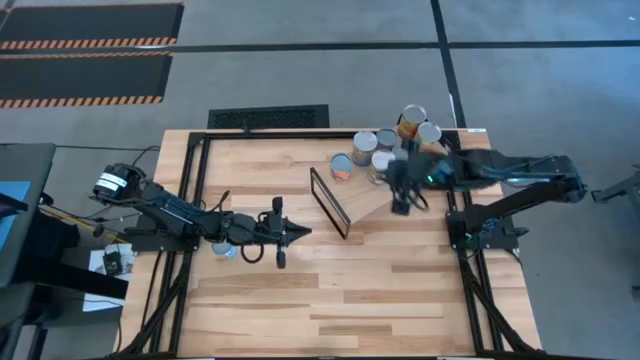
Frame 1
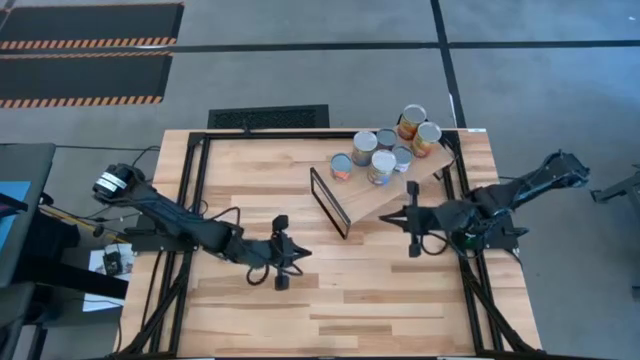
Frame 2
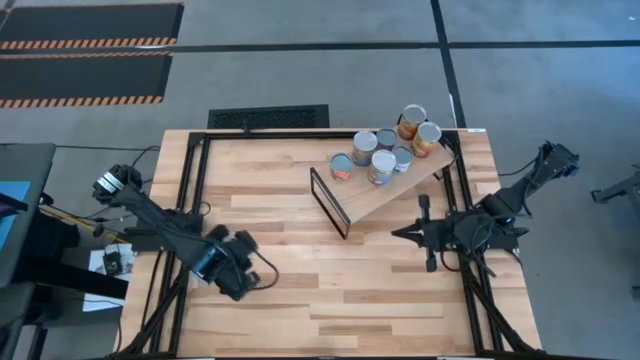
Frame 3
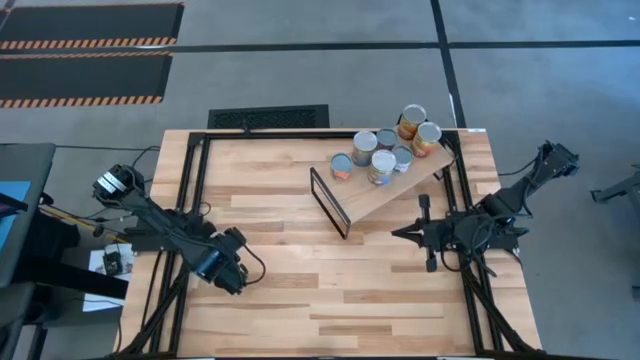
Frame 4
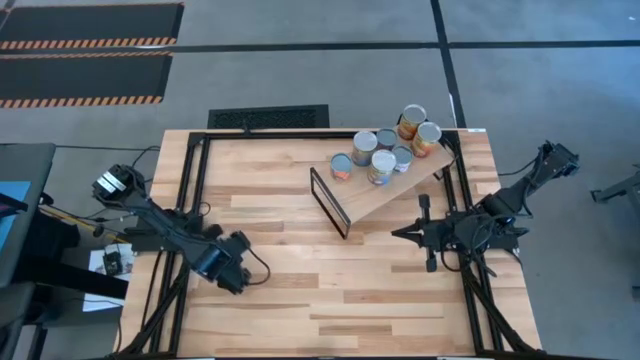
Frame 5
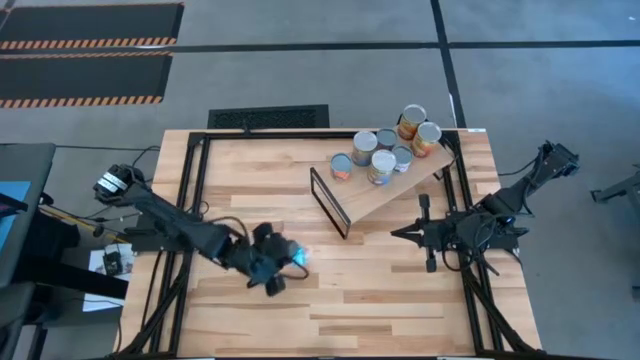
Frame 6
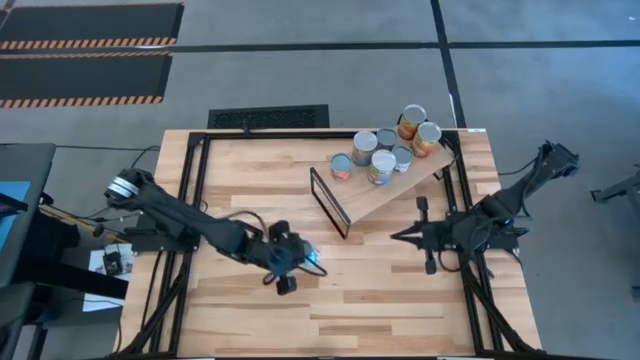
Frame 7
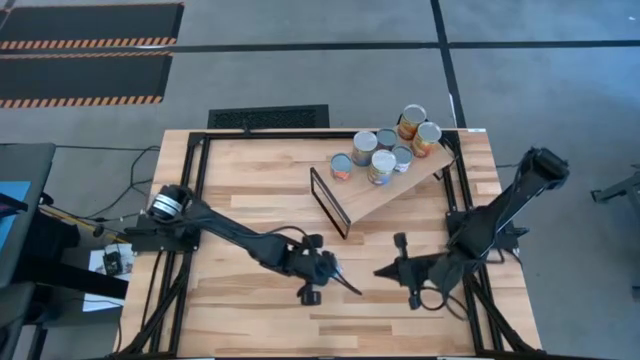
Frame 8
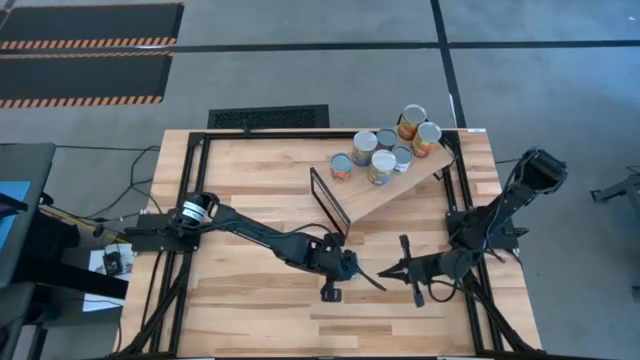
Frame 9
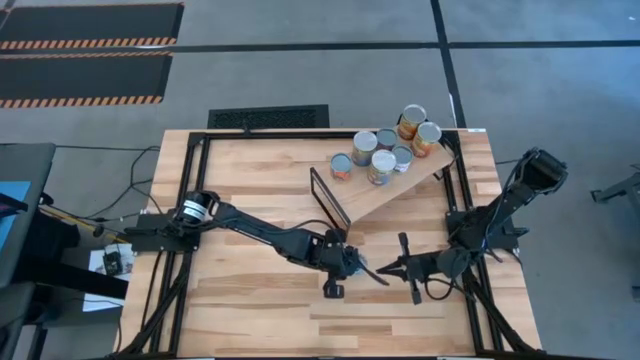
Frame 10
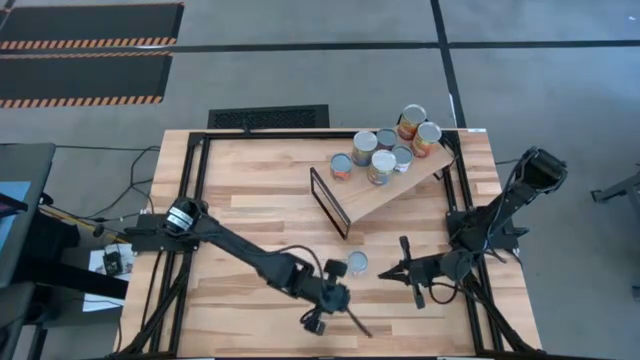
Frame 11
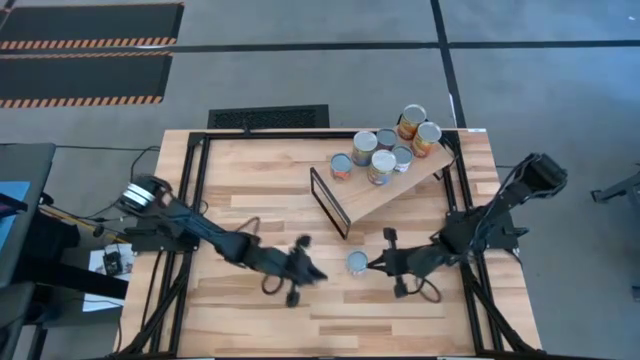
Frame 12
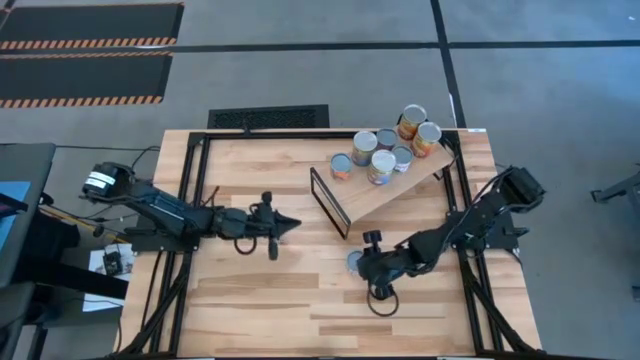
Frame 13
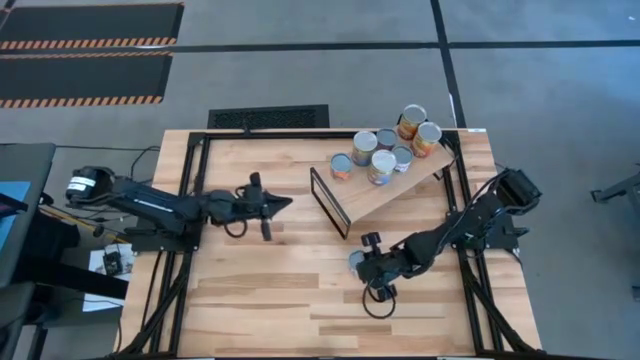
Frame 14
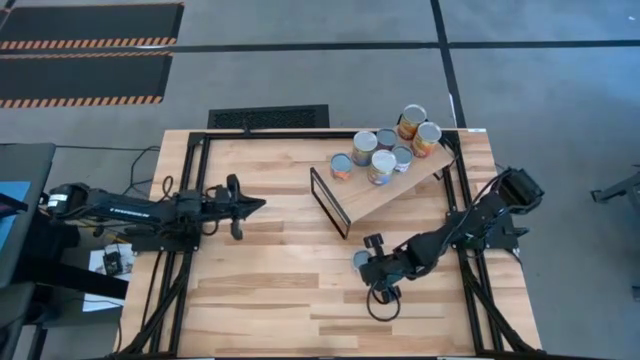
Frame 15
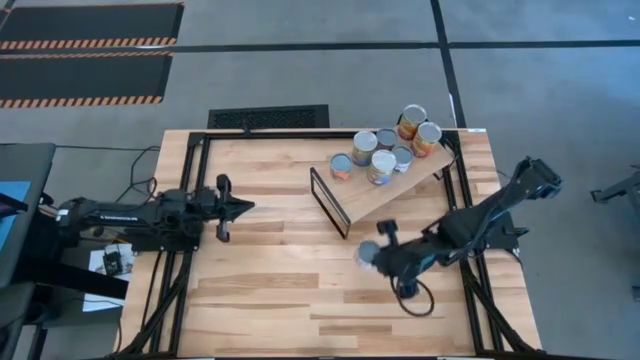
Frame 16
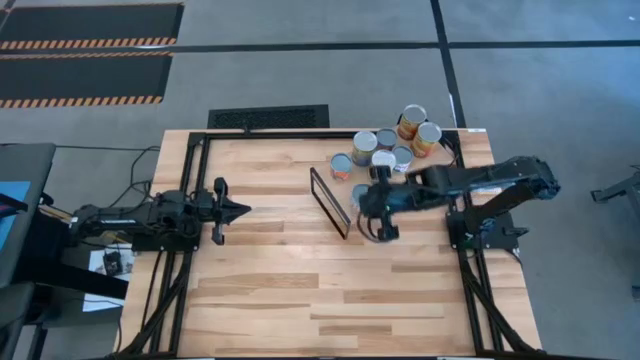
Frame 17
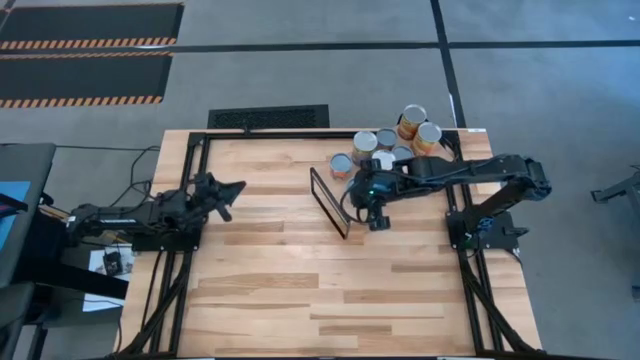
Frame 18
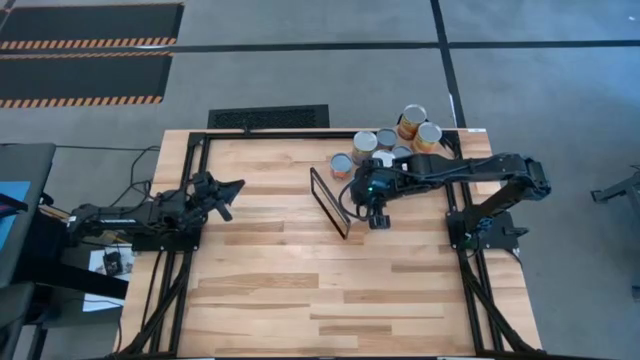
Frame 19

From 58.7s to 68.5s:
Task: Pick and place cans onto a shelf
Put the canned carrots on the shelf

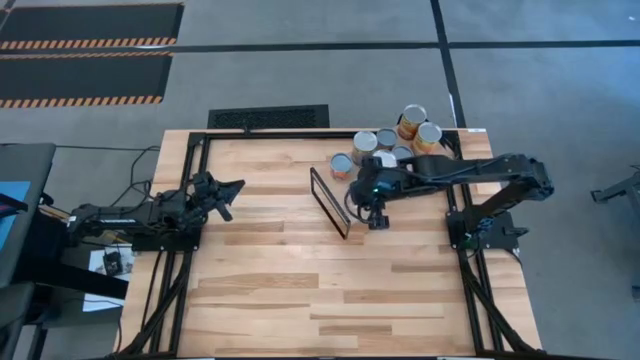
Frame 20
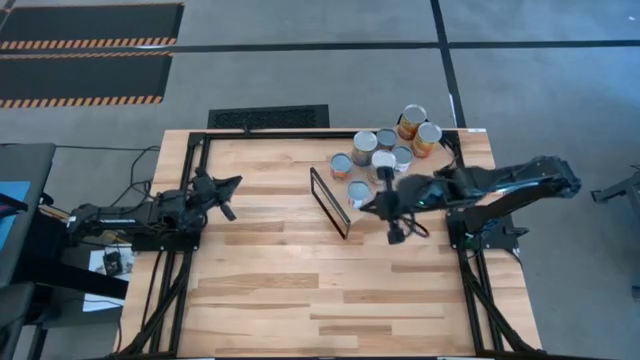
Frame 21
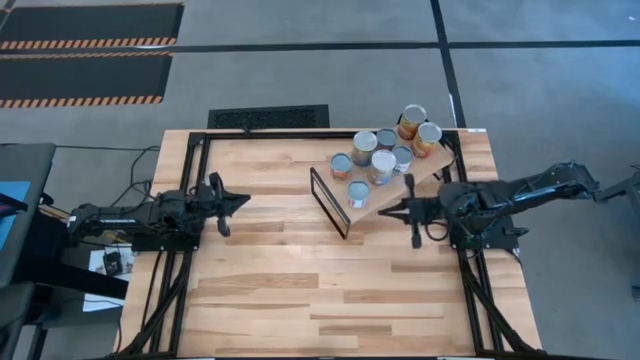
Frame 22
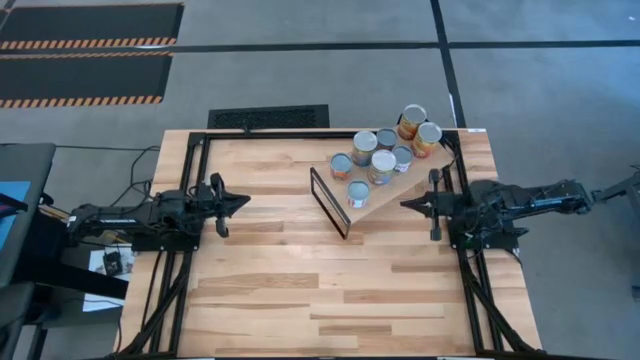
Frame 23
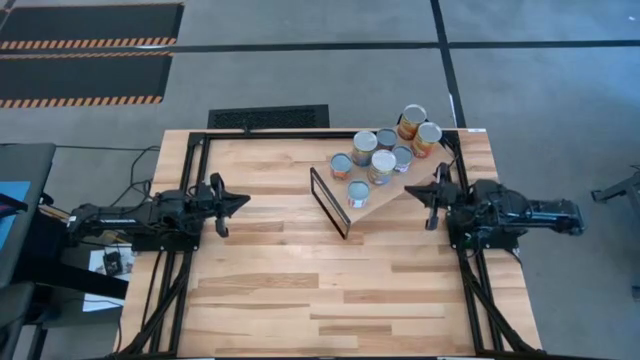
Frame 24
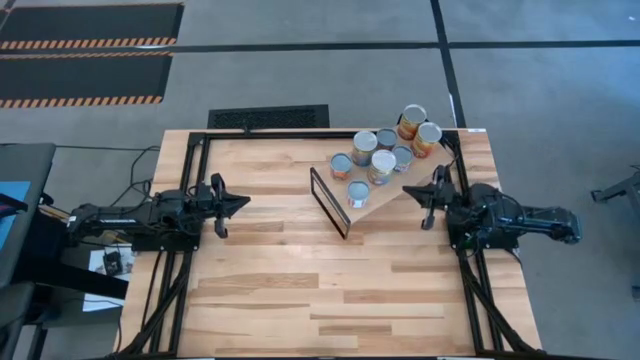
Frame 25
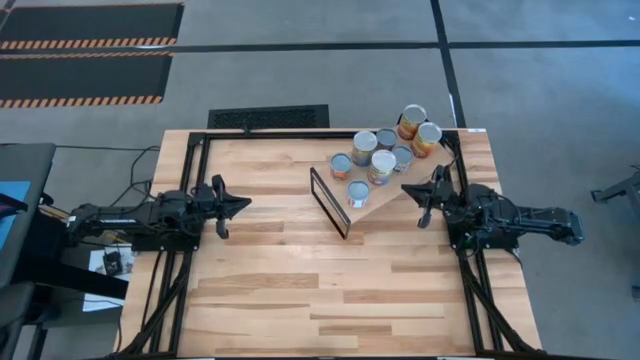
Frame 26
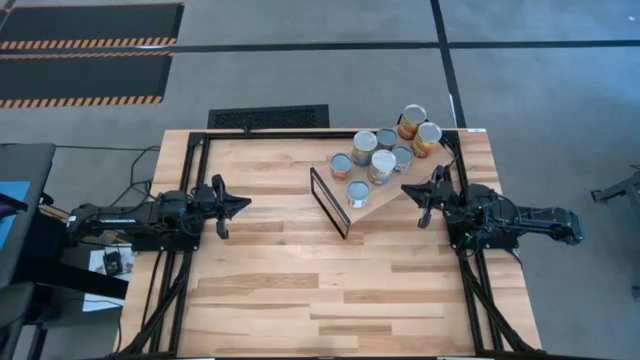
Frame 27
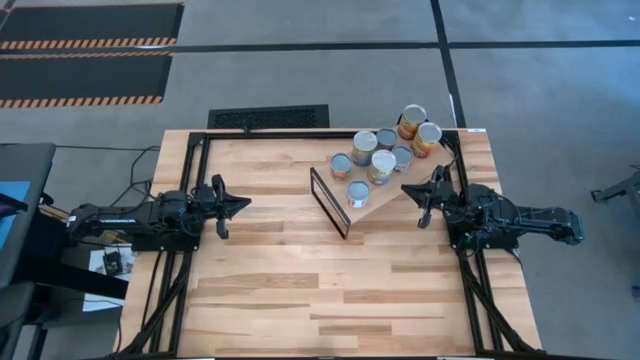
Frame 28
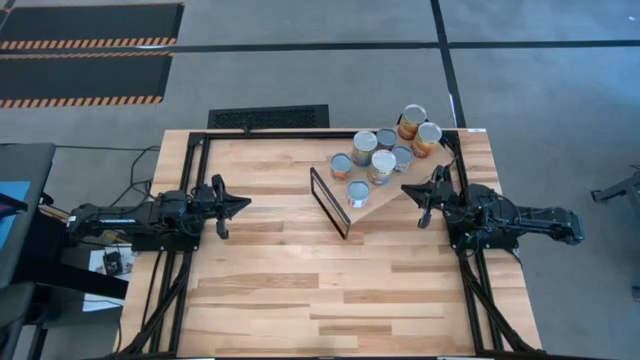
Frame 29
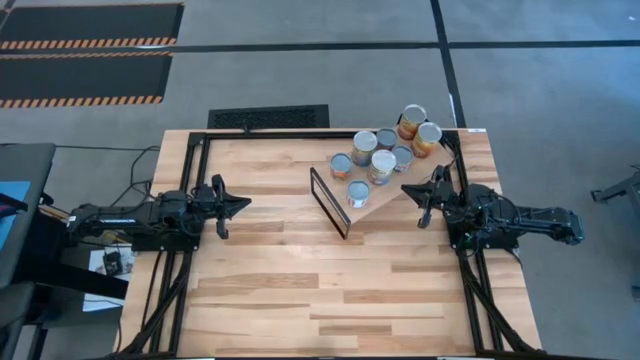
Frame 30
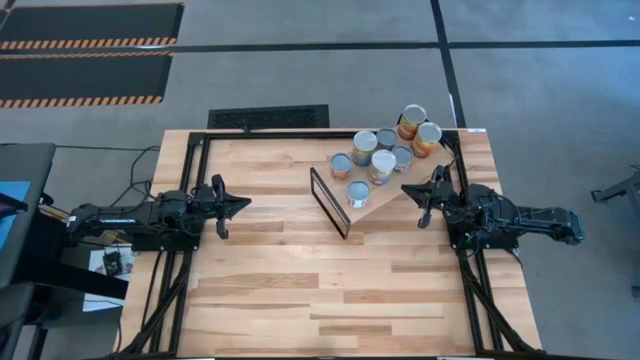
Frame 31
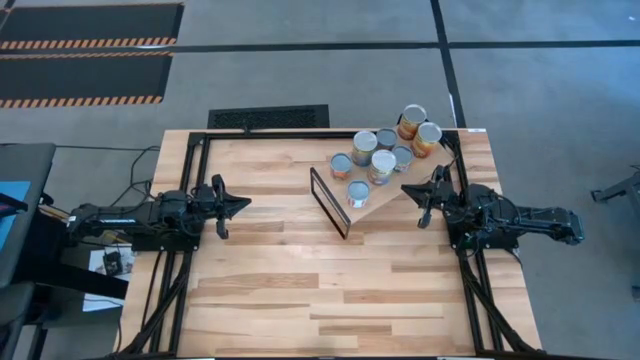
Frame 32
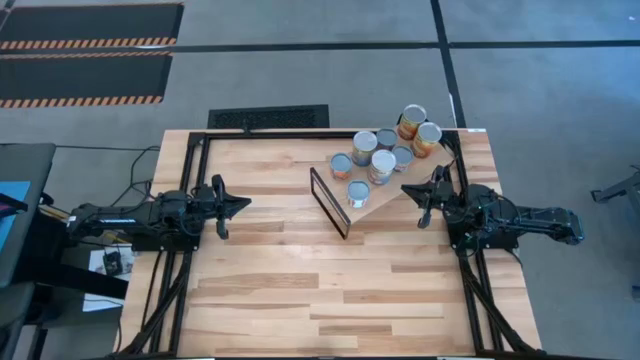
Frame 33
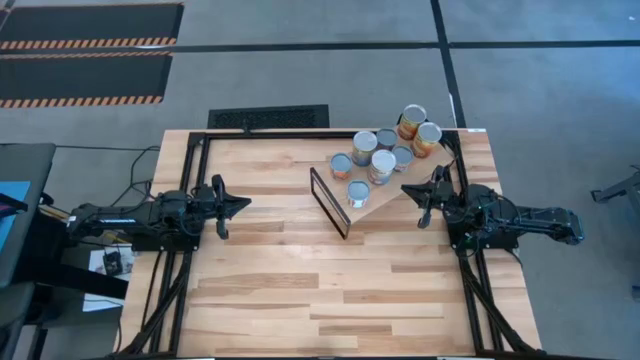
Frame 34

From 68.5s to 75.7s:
Return to Home Position

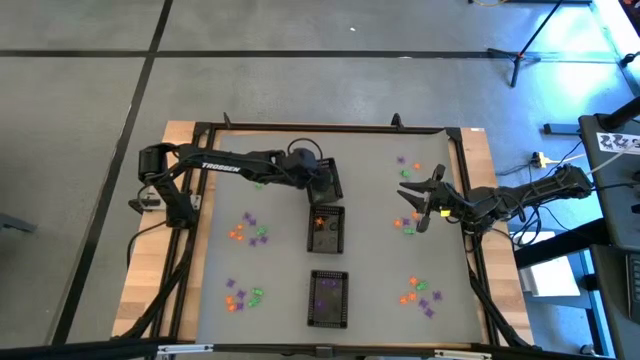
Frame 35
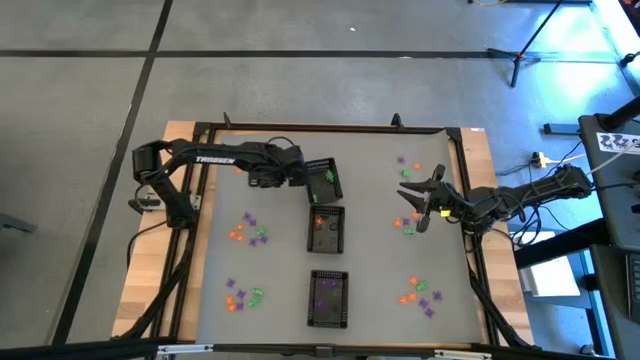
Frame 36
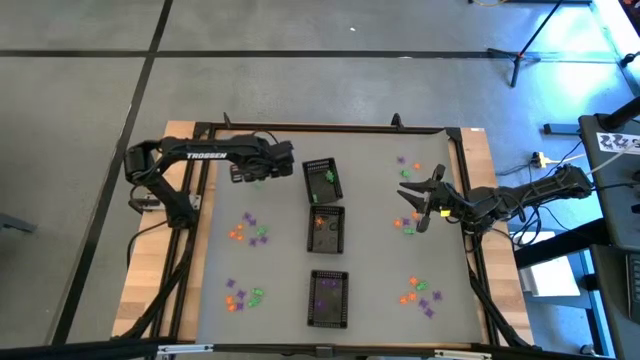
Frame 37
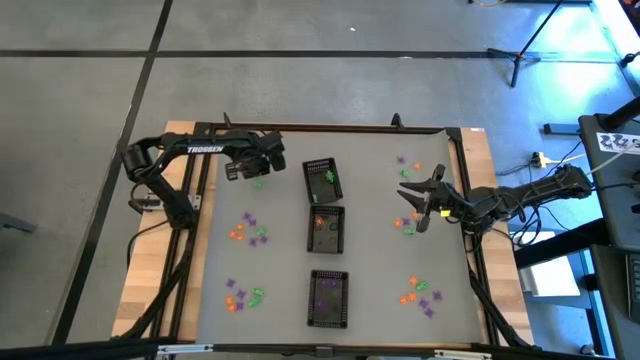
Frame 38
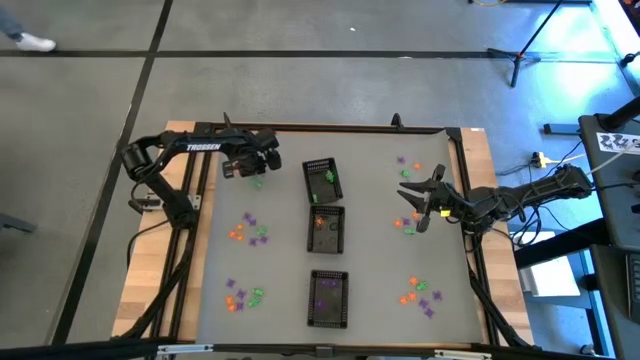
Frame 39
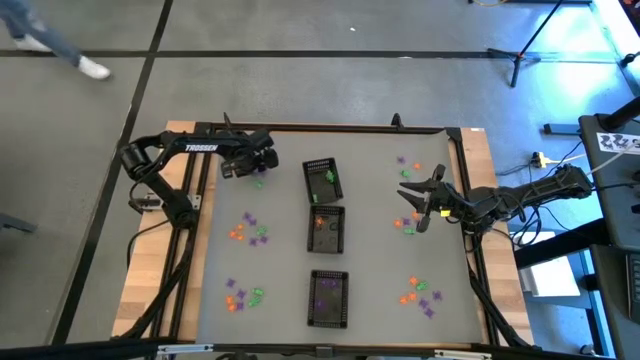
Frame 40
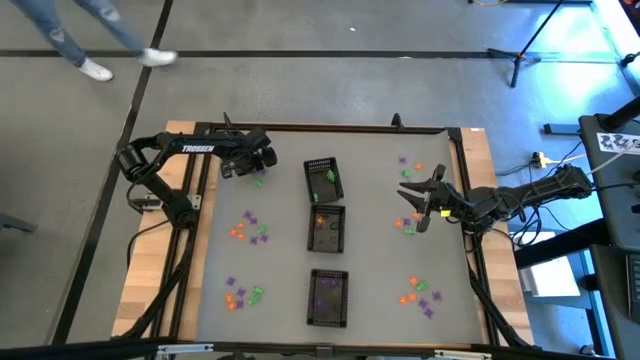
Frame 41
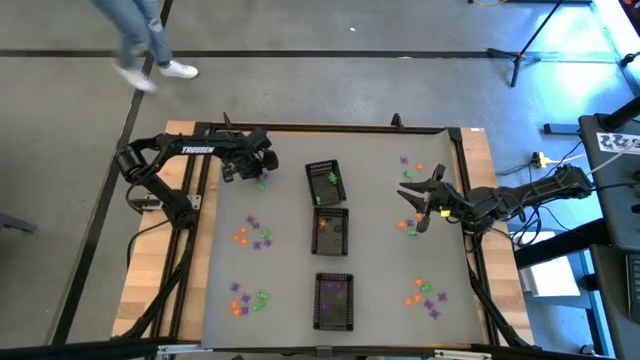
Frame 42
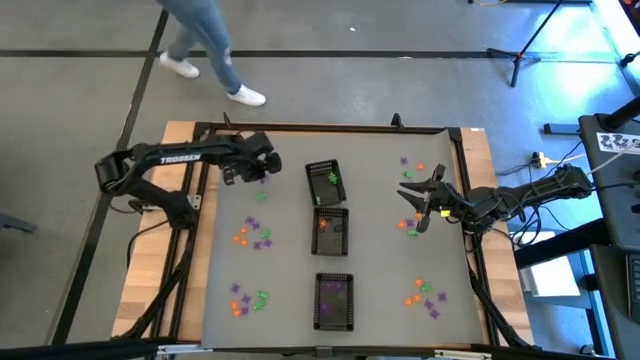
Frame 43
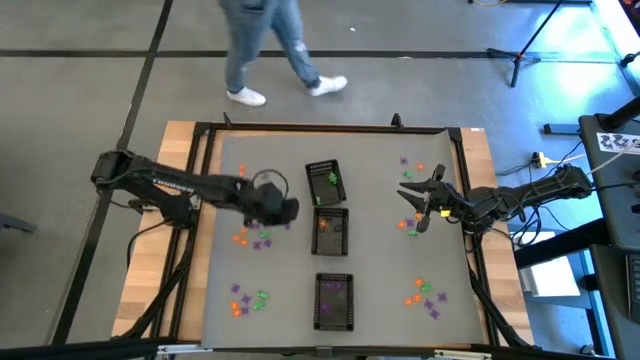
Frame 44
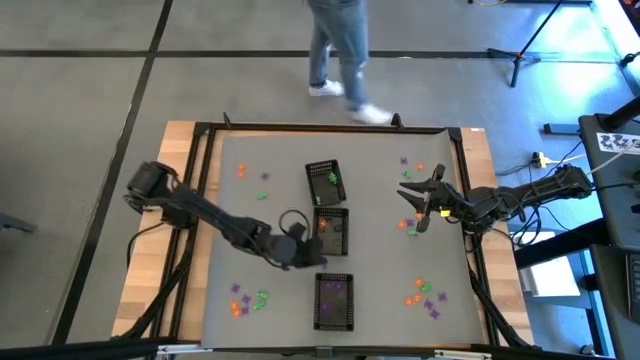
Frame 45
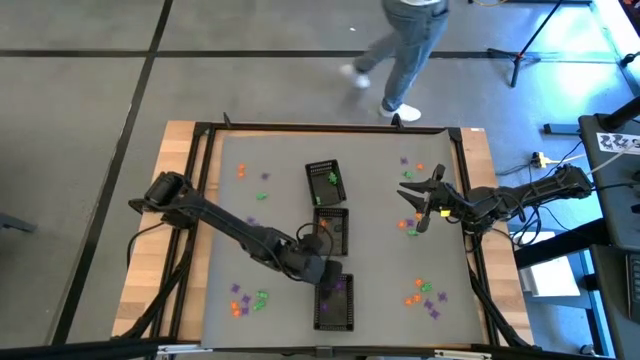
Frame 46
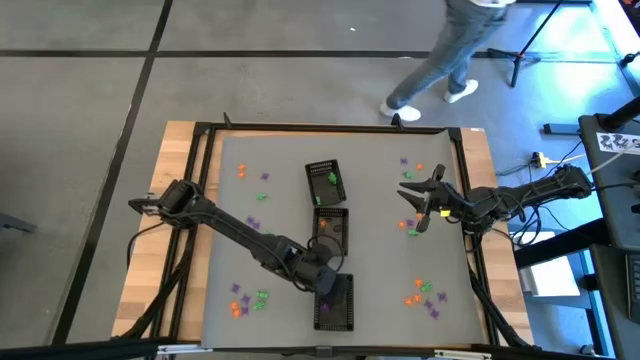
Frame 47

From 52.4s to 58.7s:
Task: Sort Halloween decoration
Put the violet spider toy into the bottom black bin
